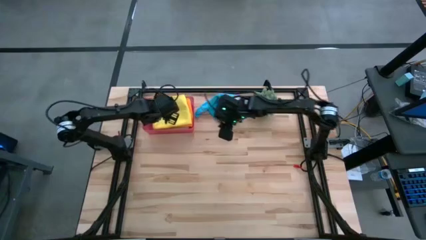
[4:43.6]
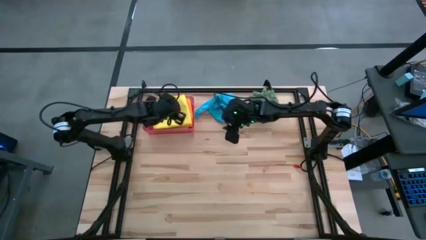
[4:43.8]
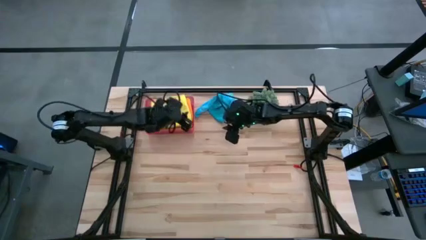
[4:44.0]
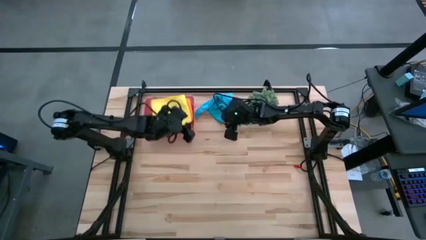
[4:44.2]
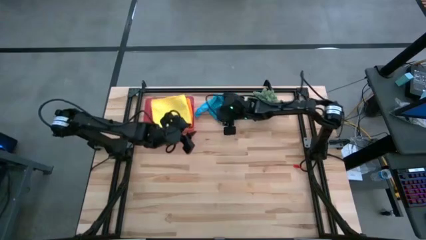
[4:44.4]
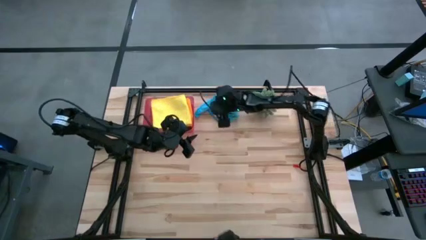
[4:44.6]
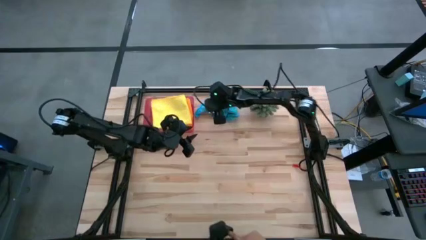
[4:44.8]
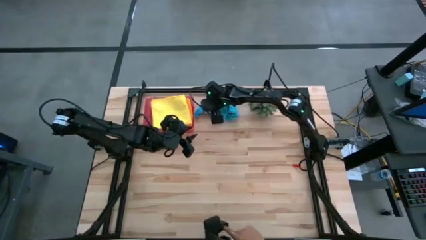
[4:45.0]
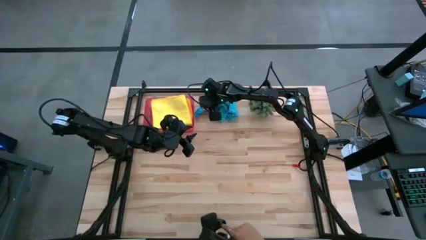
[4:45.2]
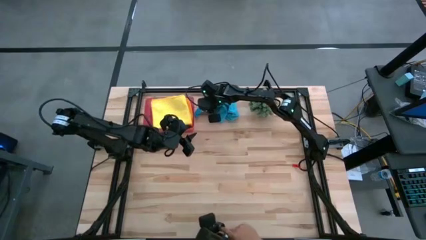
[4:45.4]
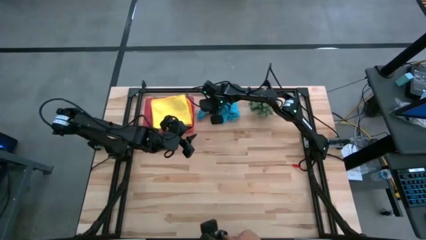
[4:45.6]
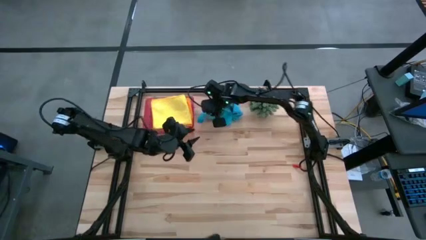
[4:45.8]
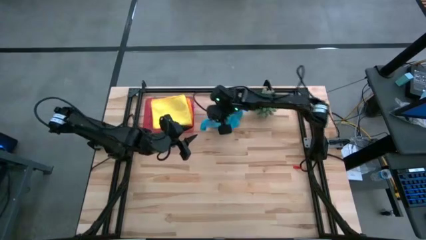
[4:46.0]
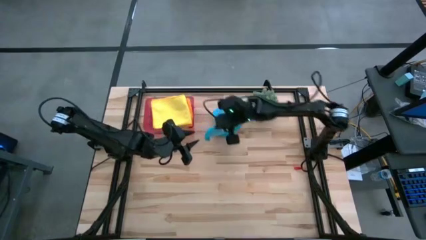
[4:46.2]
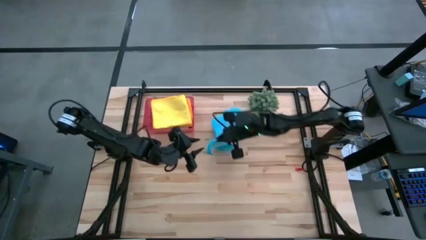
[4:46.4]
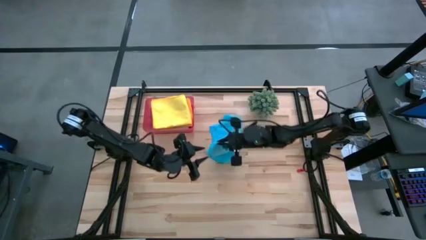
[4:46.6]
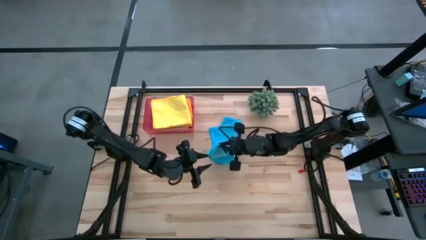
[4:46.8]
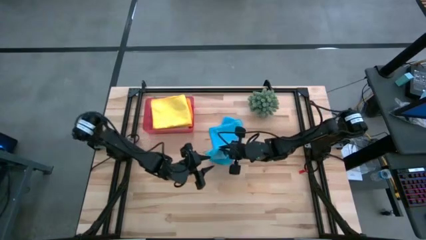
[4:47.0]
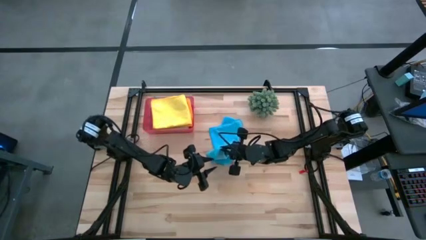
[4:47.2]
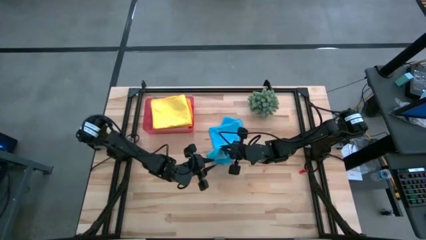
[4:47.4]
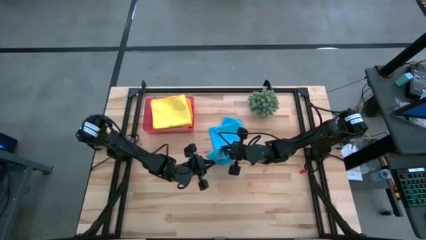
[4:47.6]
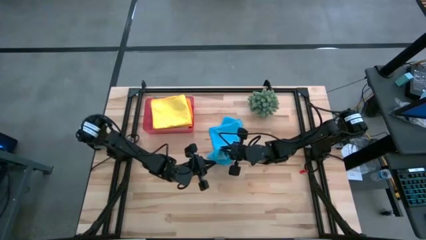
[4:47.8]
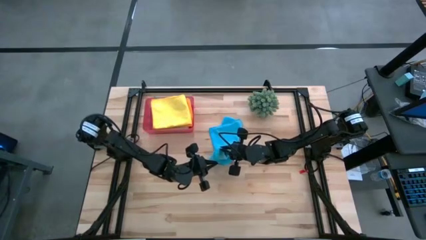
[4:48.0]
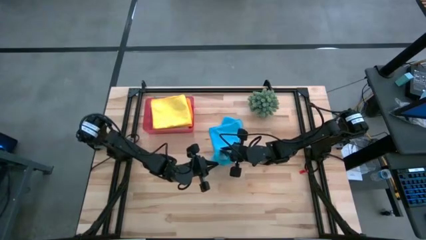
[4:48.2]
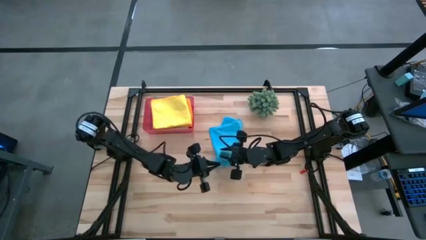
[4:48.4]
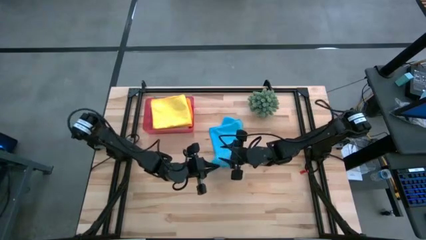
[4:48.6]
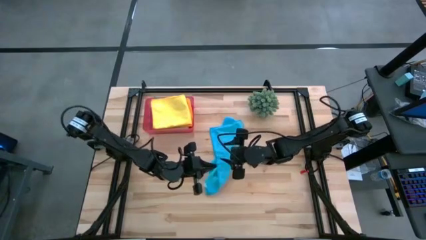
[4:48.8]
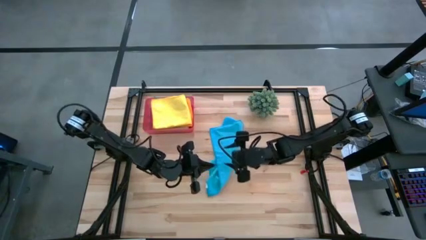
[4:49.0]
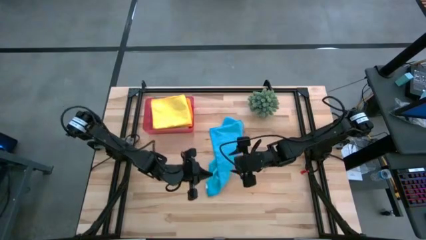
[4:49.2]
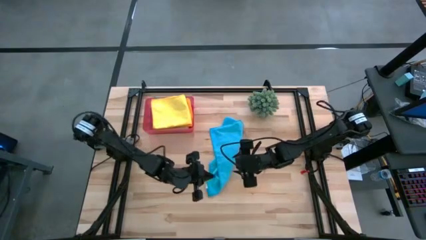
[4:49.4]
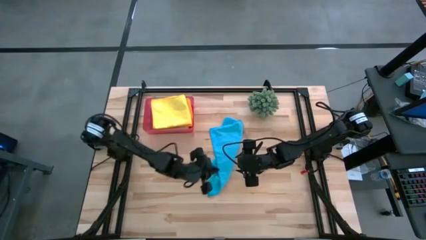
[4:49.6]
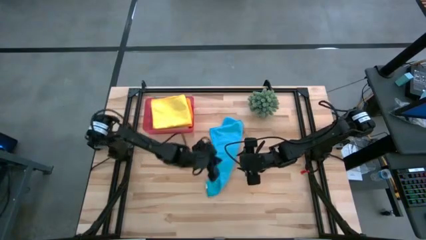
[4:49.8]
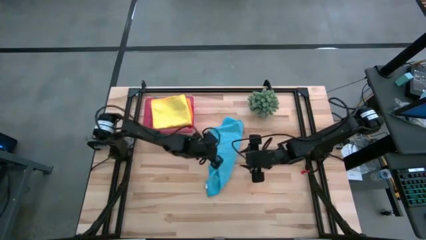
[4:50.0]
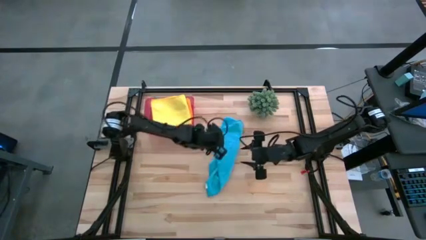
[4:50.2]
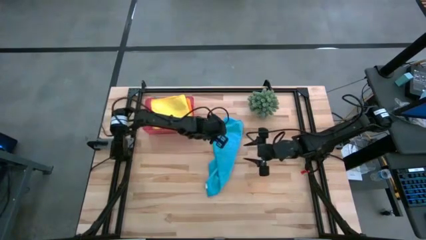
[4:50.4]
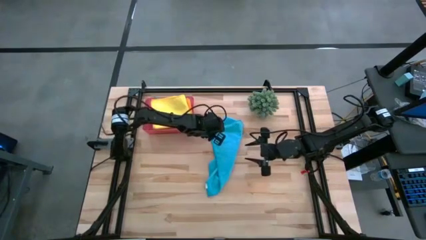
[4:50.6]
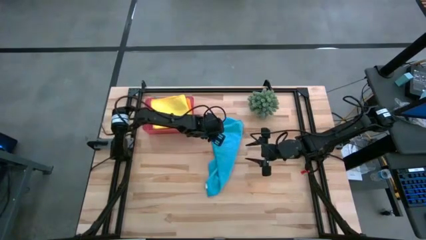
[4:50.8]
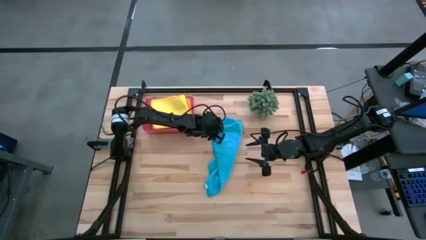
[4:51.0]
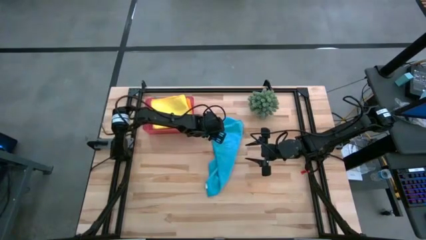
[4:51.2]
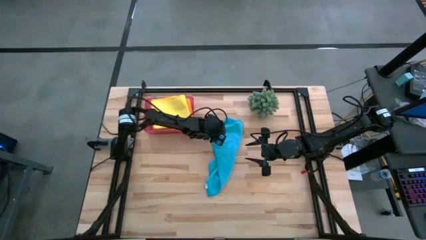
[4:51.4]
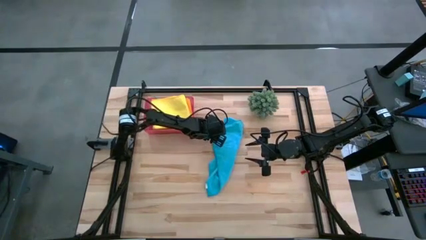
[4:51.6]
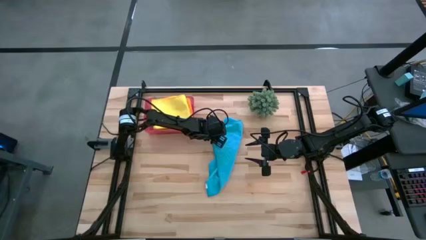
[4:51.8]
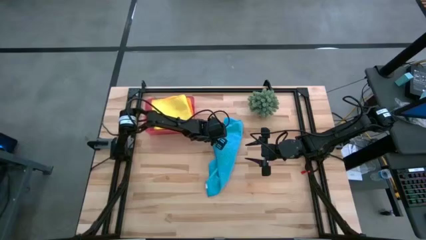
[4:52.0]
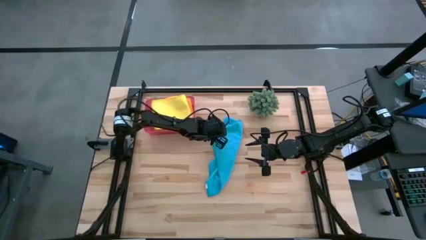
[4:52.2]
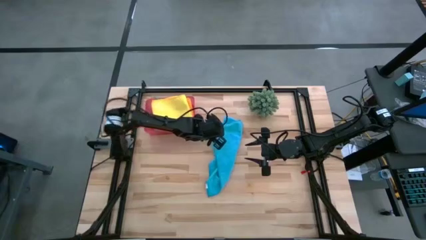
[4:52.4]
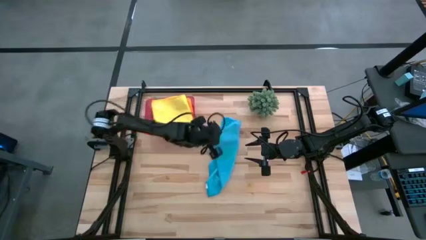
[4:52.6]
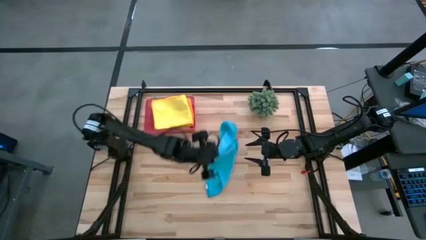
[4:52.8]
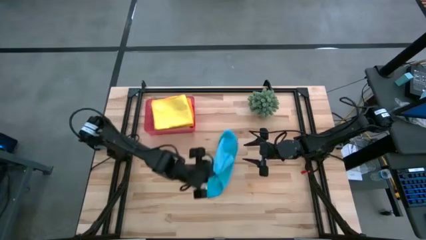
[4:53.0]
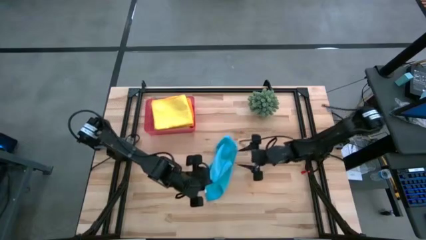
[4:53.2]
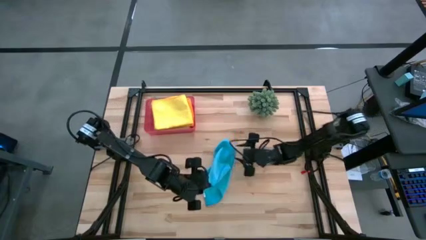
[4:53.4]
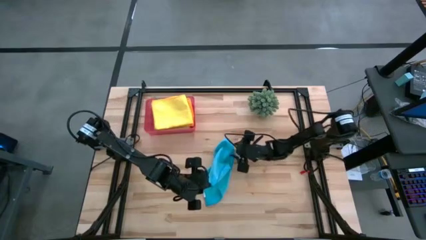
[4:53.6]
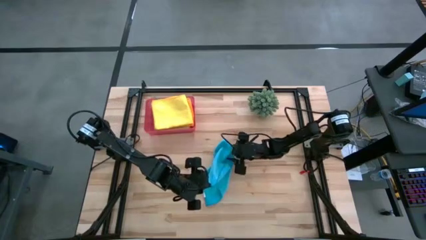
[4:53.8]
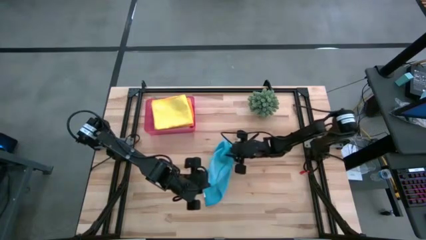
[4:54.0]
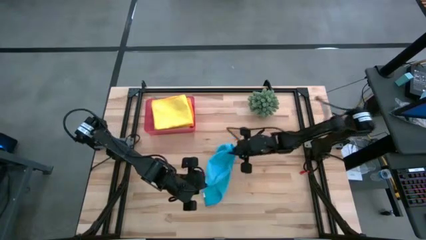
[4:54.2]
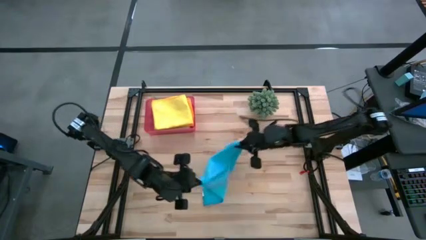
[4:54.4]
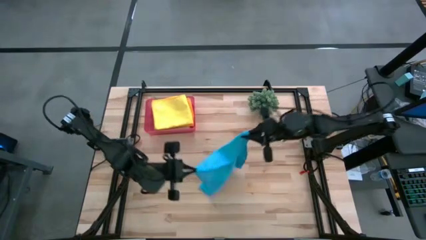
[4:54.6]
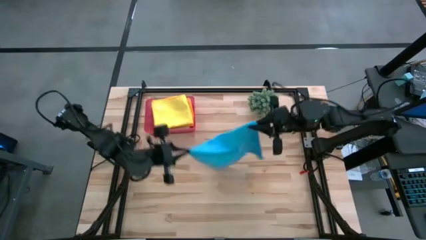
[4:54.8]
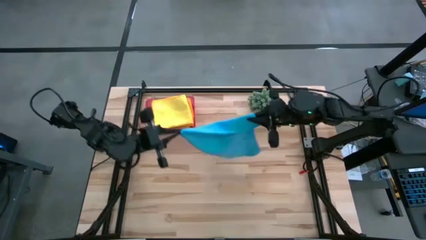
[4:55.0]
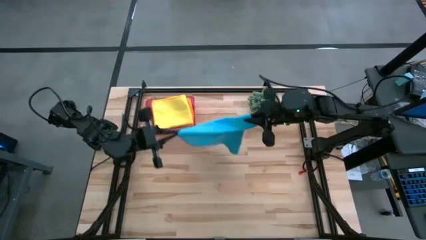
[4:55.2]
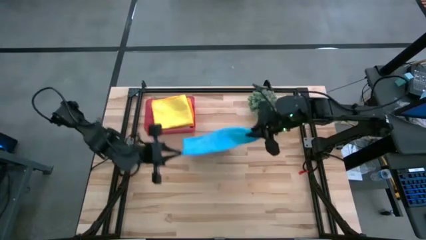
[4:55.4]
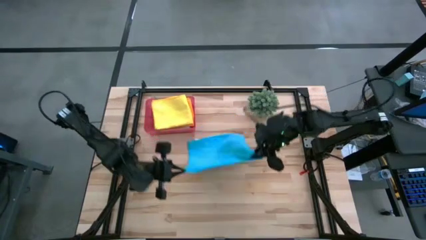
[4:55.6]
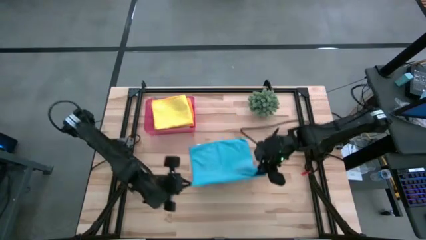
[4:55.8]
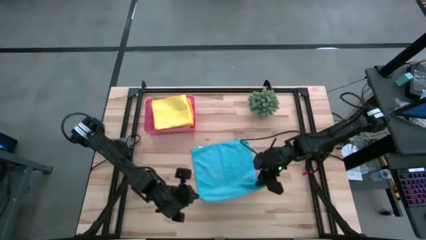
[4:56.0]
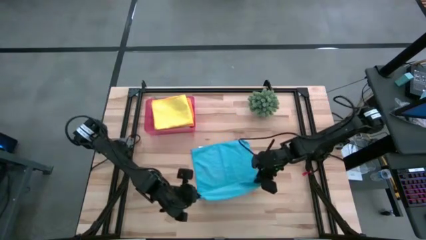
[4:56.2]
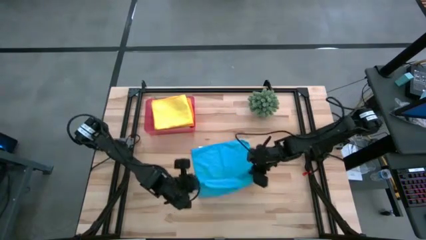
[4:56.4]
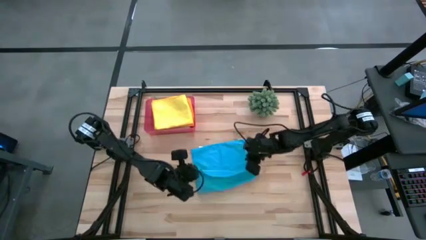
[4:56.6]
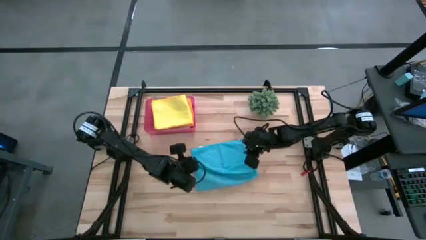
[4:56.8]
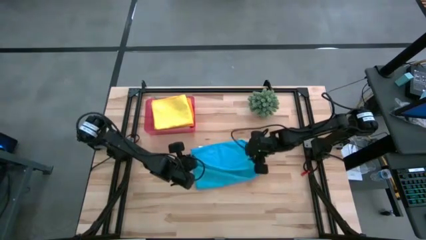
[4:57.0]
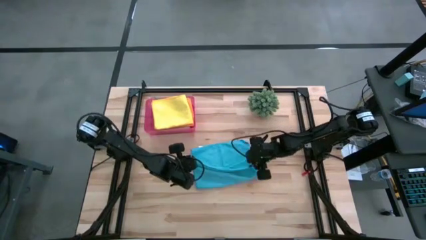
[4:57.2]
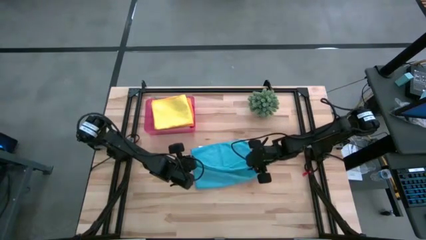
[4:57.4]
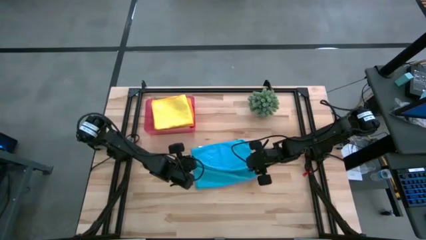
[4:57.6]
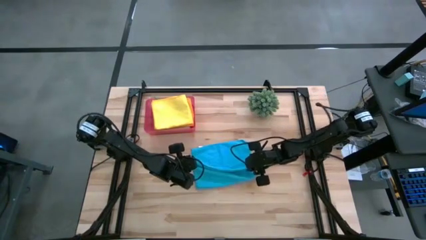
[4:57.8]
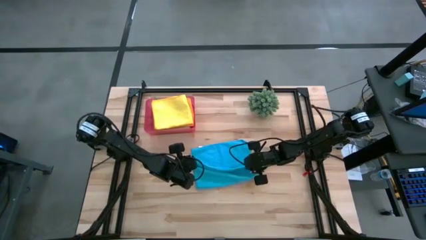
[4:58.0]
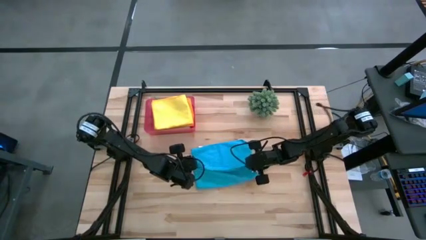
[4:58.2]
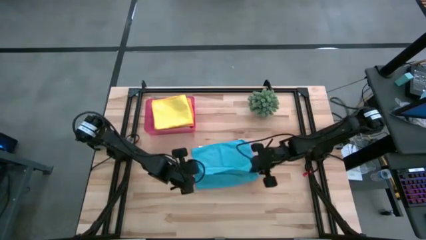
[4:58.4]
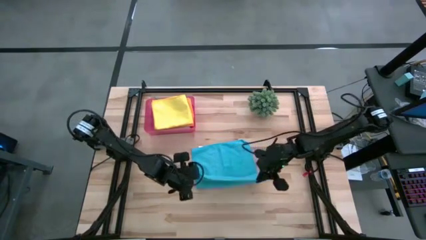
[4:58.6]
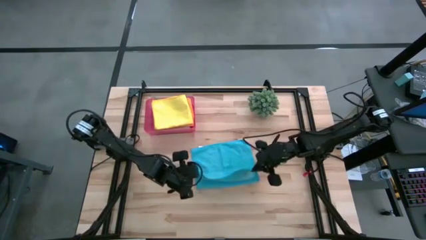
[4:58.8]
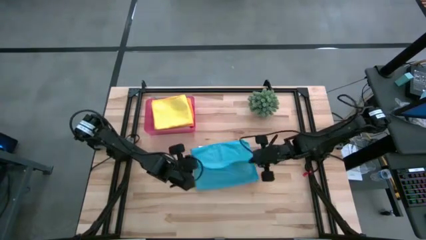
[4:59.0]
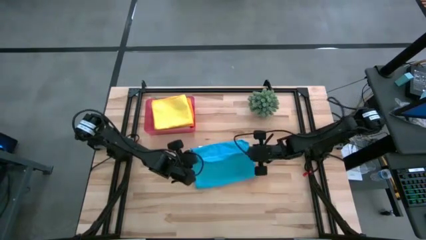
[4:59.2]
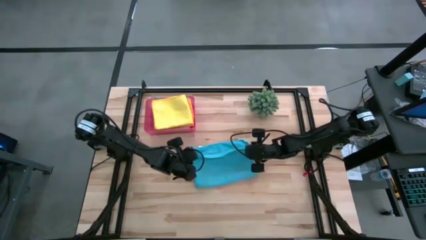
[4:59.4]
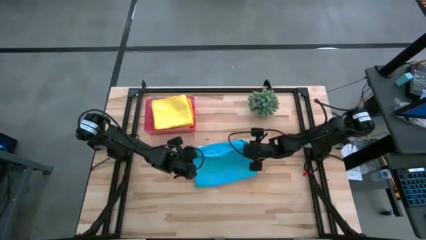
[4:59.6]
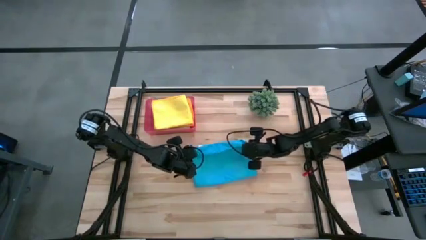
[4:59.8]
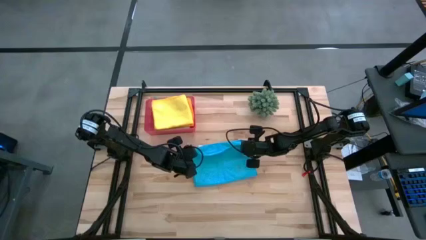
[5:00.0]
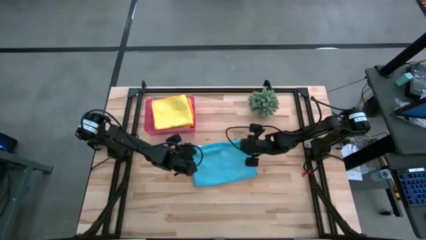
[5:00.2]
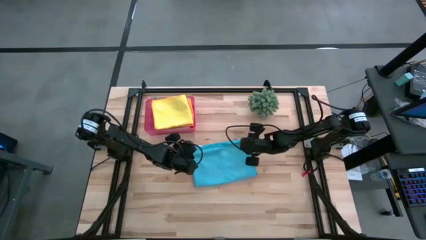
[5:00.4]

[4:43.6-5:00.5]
Task: Fold microfiber towels
Fold the blue towel
